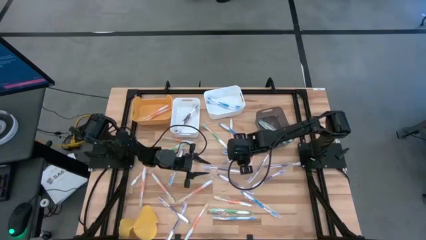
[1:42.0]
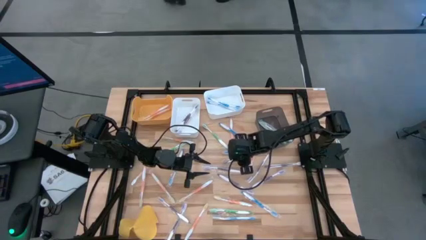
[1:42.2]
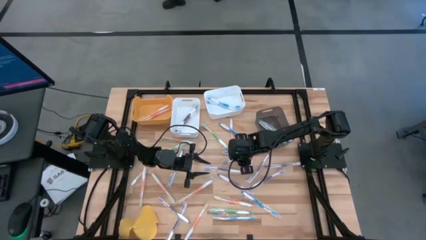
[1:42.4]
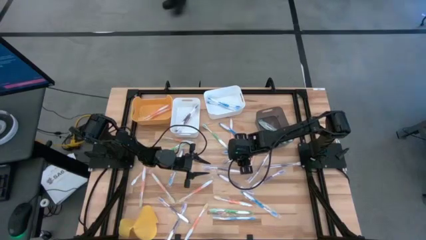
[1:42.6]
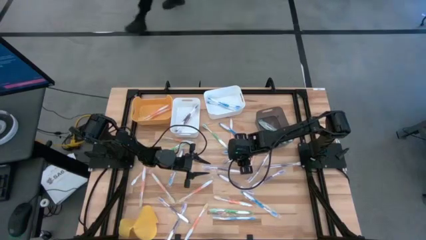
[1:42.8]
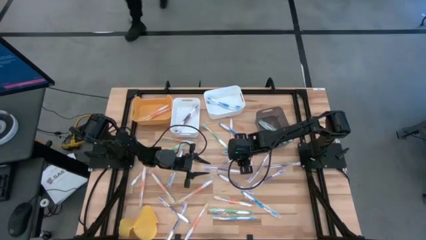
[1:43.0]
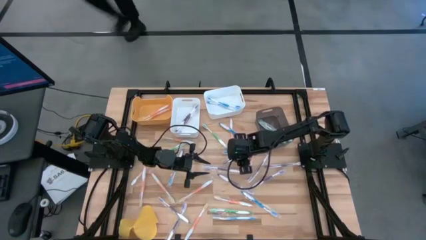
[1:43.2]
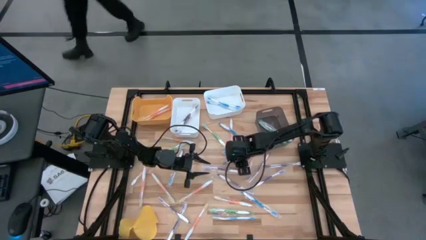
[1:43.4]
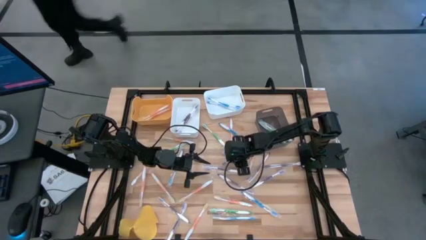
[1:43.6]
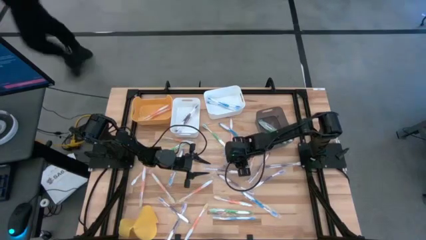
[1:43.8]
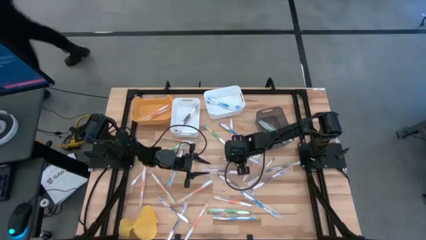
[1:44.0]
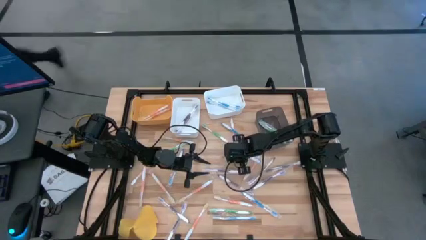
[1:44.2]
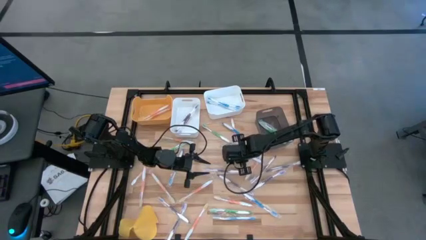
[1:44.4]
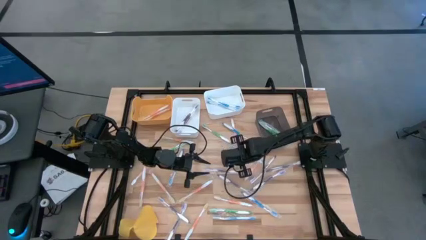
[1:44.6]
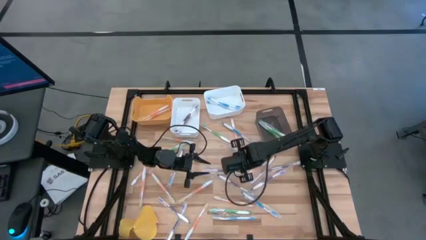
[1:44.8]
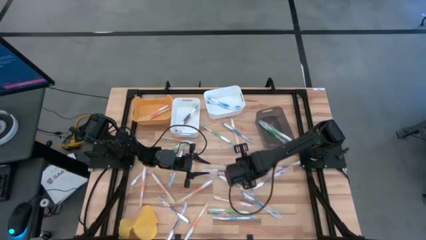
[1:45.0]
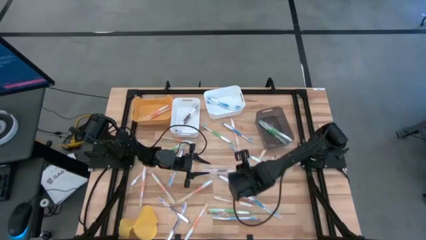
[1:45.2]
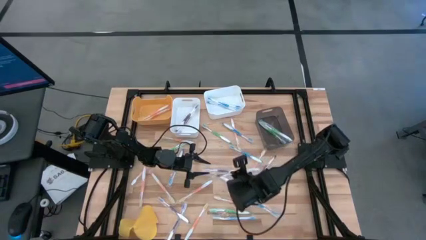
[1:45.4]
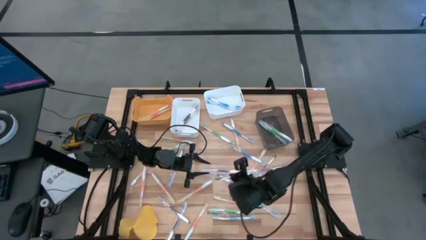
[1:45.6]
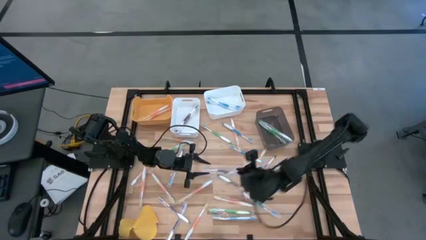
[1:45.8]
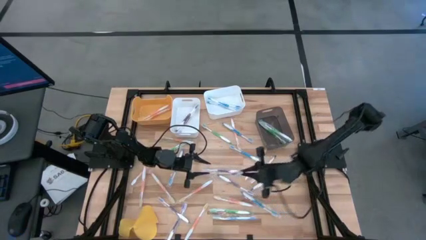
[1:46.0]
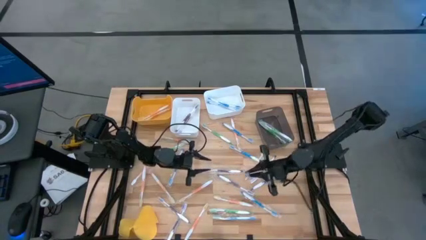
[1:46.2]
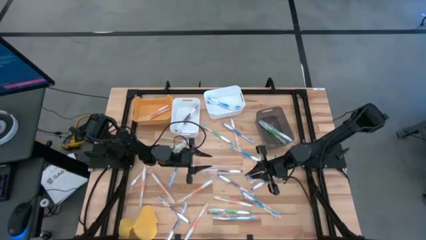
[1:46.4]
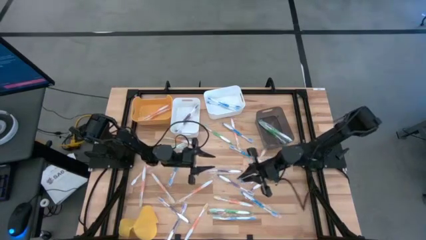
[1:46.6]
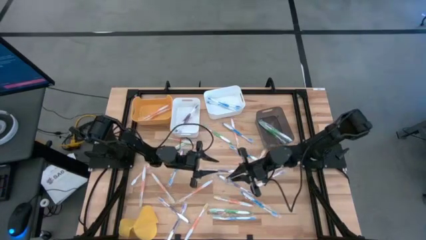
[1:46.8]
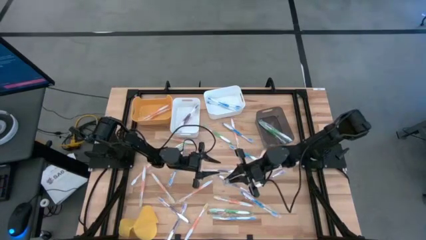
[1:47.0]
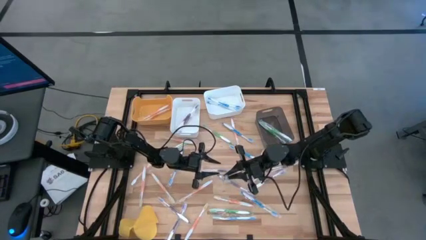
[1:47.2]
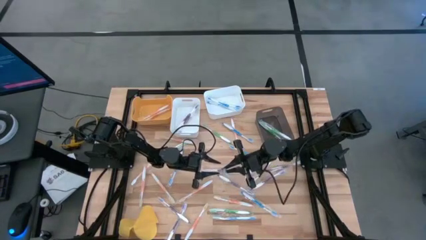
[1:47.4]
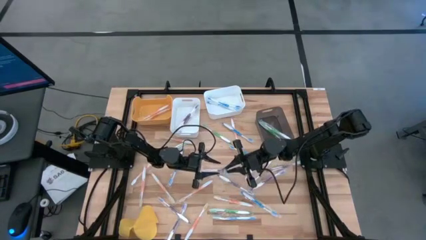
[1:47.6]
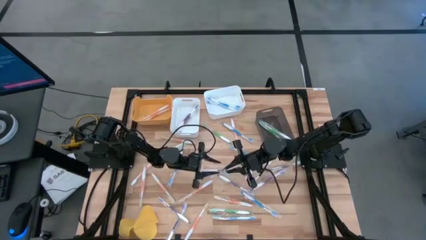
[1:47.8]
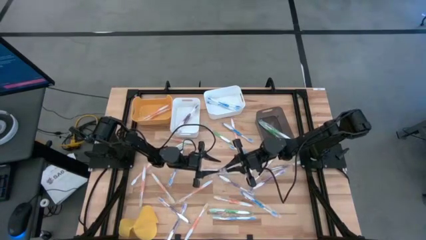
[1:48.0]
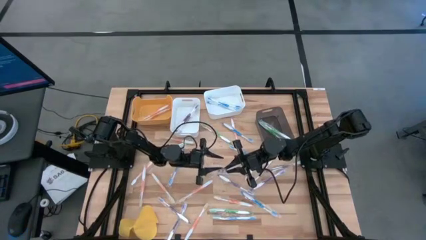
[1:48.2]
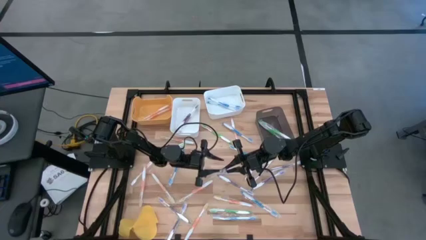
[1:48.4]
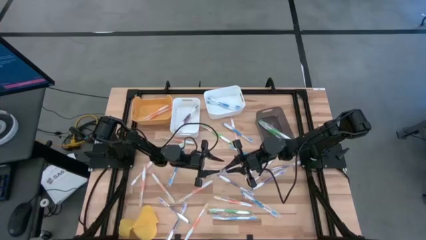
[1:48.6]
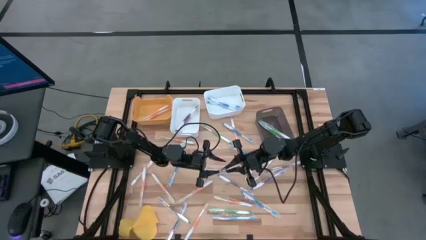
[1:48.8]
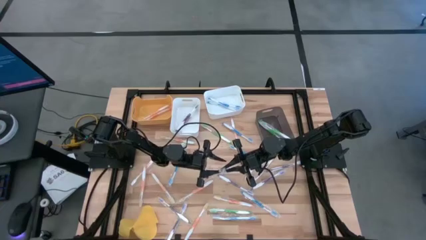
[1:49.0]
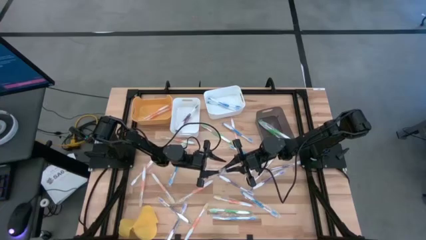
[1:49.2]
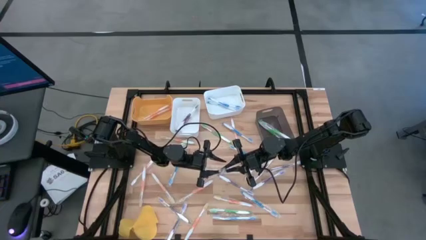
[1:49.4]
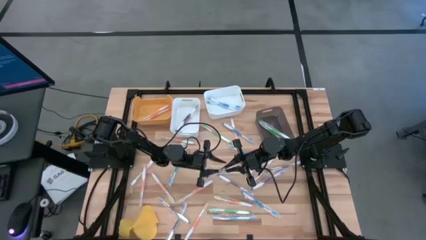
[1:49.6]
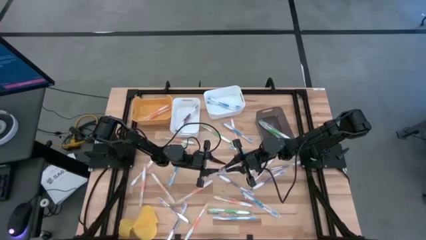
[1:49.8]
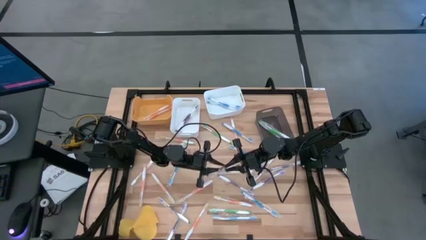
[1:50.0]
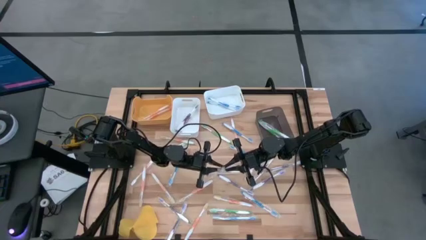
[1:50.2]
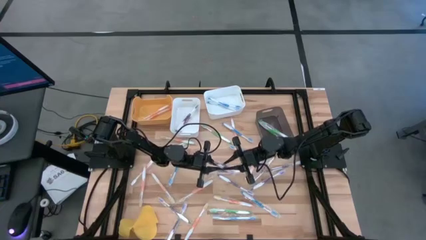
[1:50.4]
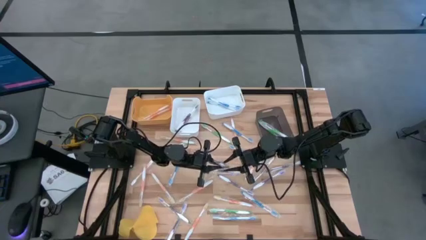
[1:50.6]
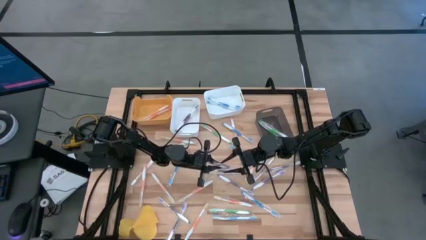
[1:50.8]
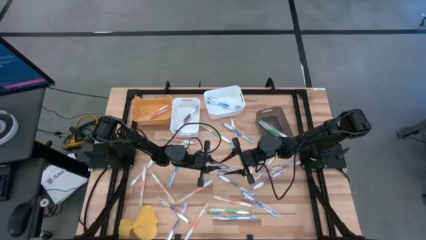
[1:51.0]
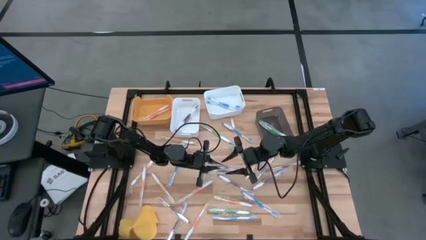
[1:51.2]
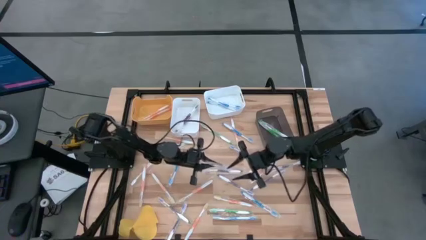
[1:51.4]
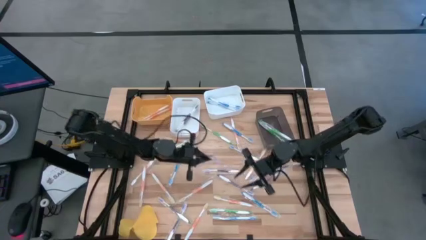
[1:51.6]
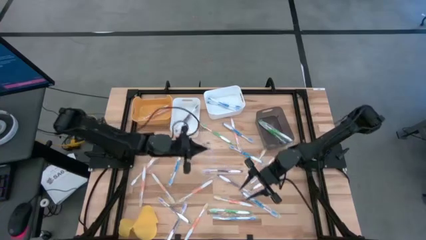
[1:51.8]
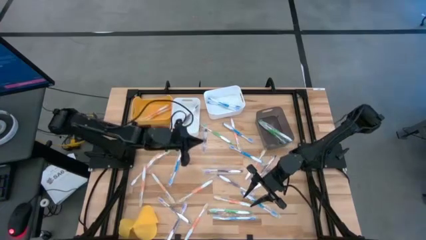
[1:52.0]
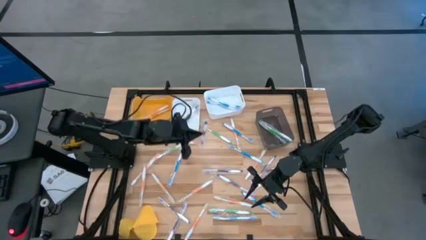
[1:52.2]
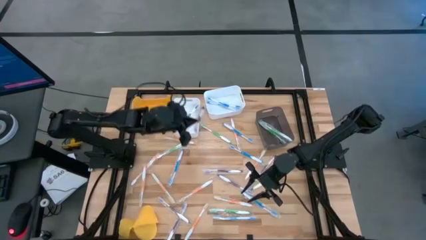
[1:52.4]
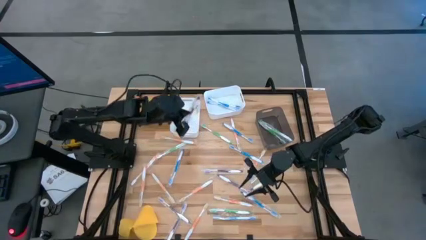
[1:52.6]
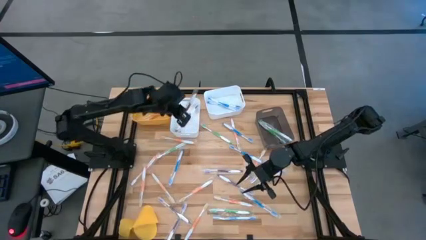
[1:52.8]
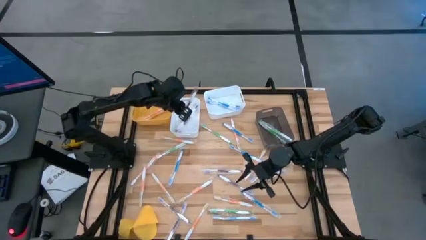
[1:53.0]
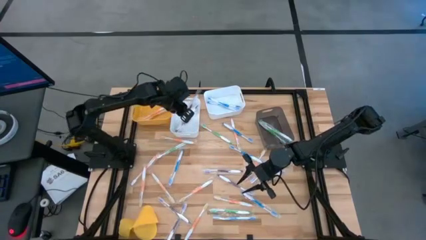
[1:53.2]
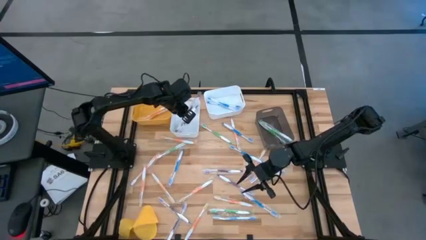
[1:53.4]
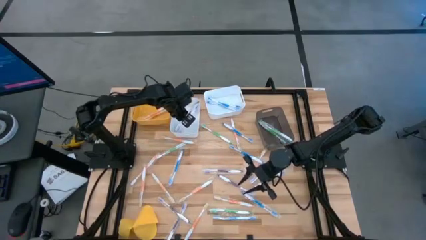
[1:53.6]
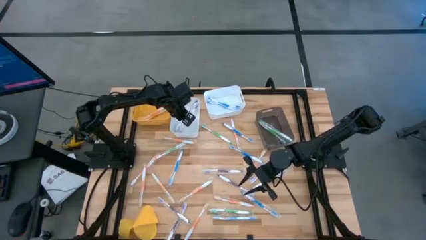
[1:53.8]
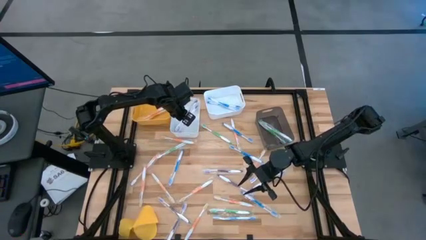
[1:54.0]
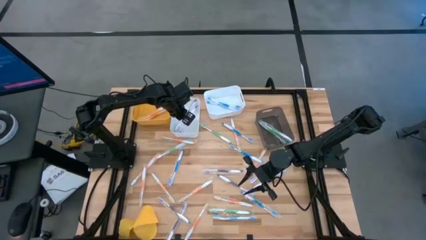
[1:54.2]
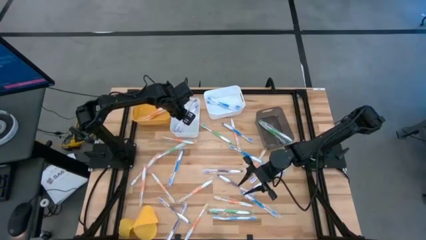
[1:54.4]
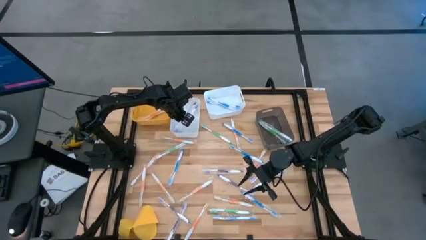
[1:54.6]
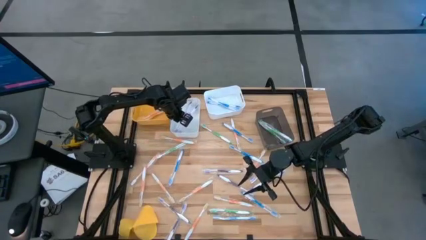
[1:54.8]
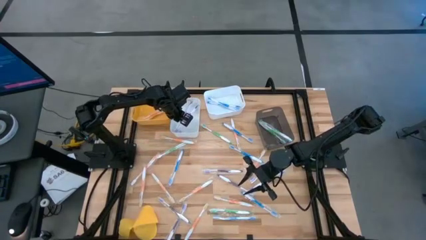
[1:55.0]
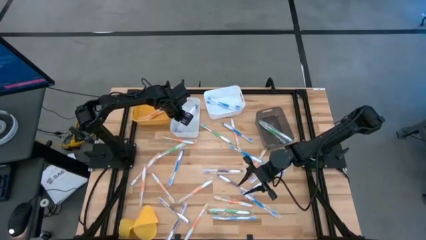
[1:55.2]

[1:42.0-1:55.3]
Task: Pick & Place Toothbrushes
Put the purple toothbrush into the left white bin

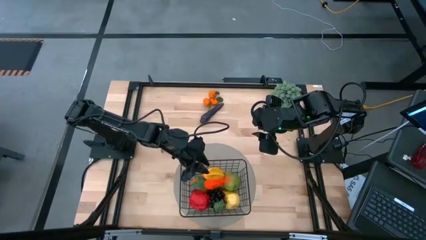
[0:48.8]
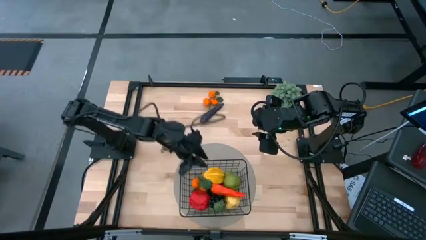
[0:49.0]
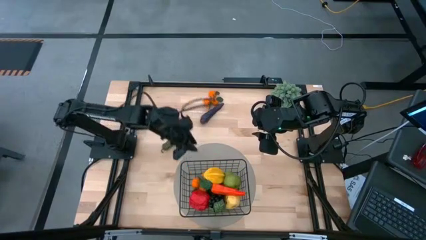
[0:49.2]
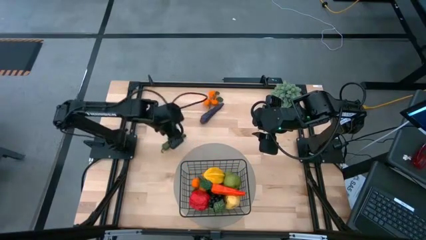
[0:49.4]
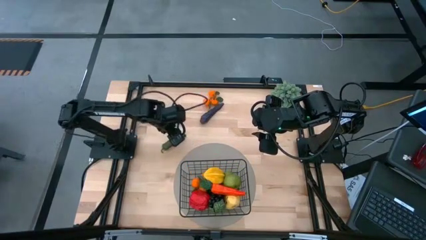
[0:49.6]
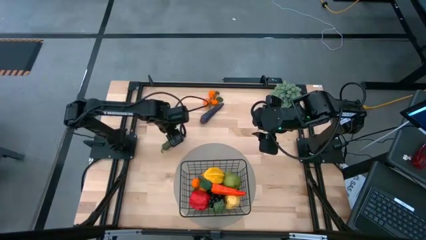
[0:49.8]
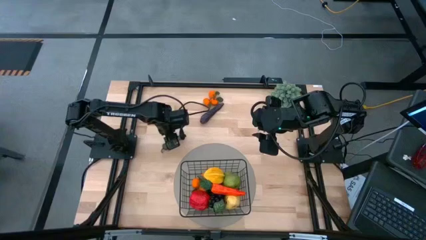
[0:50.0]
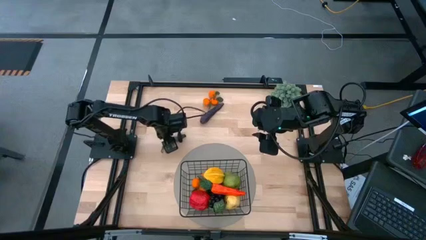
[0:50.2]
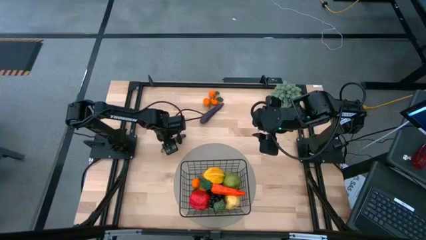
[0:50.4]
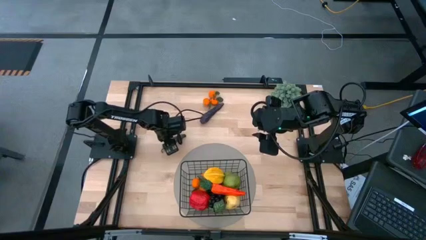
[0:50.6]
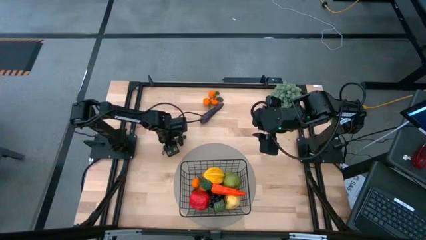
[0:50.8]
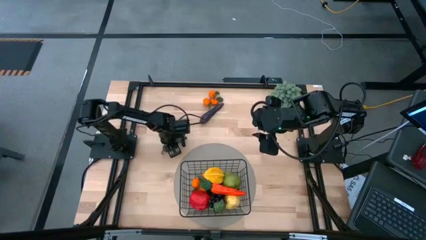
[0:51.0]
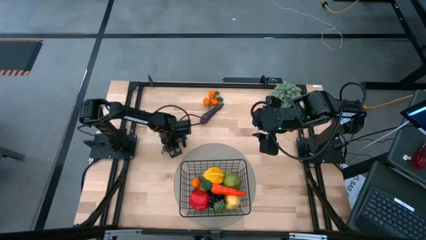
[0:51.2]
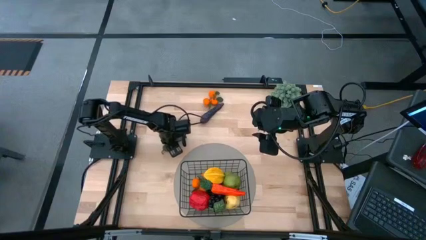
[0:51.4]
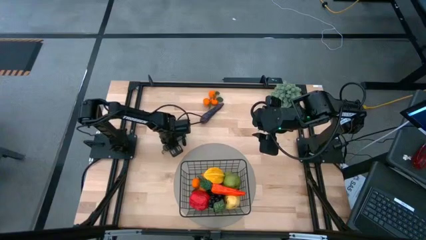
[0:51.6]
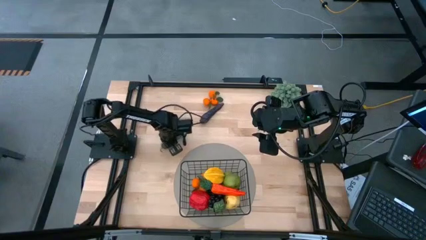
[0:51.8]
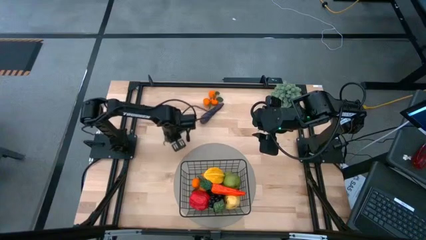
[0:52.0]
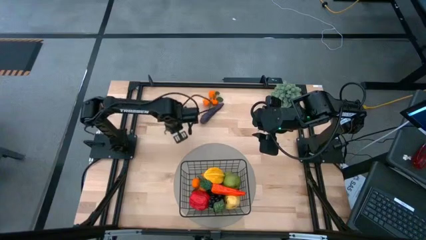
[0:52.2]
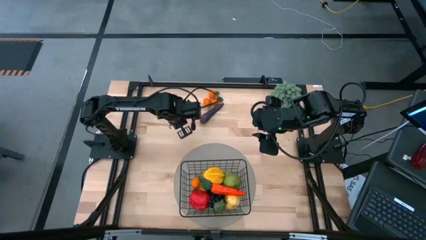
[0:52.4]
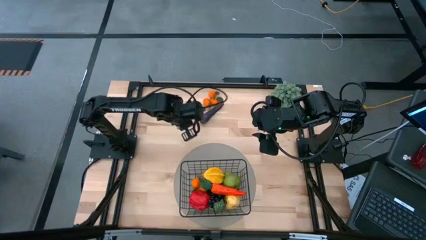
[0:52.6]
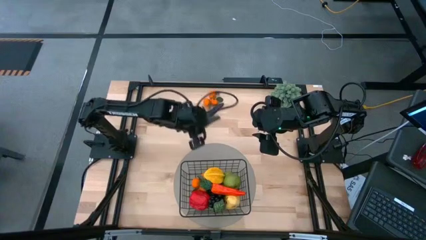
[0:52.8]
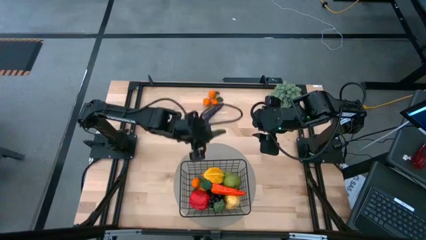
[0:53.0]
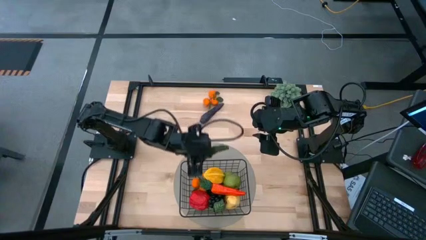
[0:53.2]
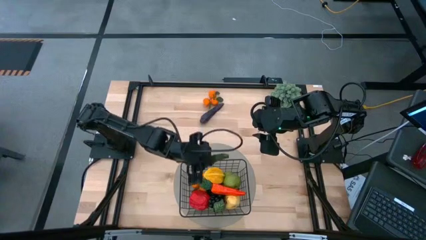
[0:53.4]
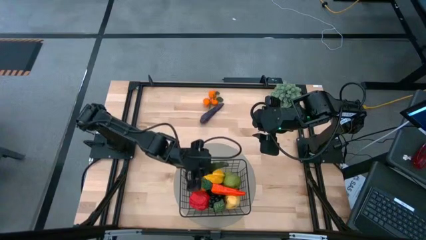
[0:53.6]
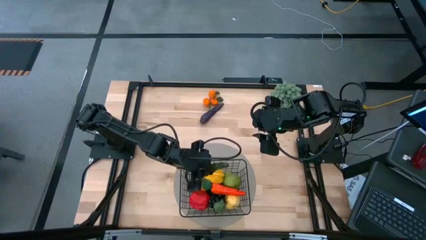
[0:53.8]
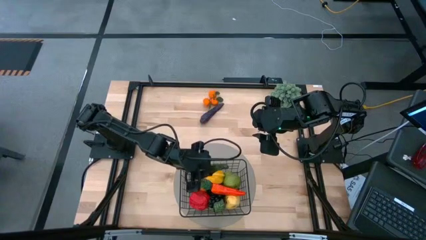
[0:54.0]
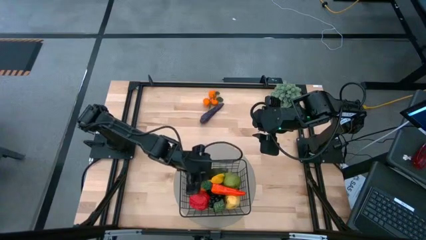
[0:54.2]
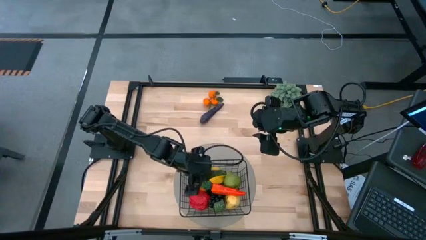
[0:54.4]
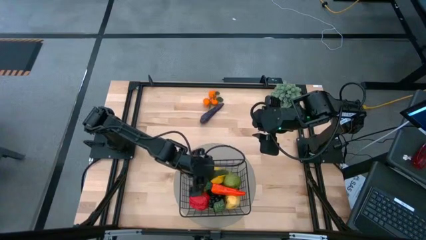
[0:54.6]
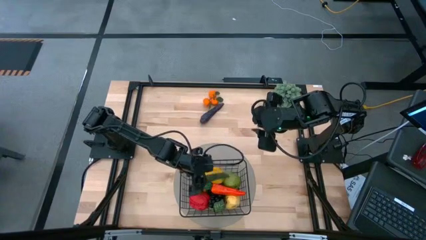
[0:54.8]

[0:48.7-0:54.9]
Task: Build produce basket
Put the green chili pepper into the black wire basket
